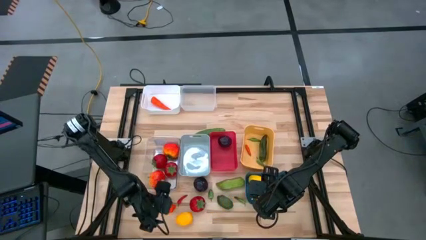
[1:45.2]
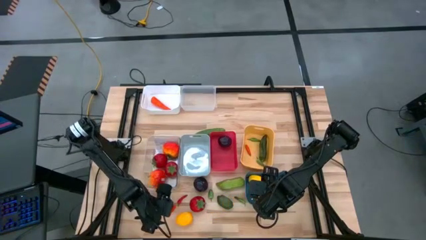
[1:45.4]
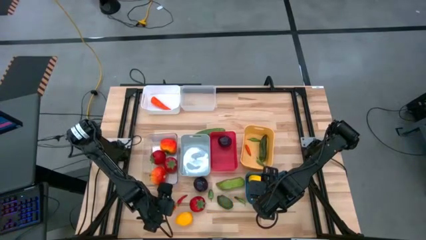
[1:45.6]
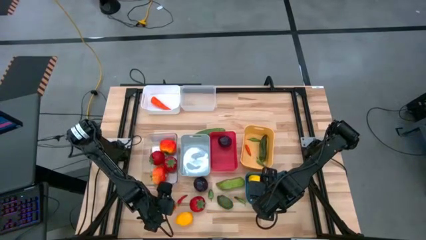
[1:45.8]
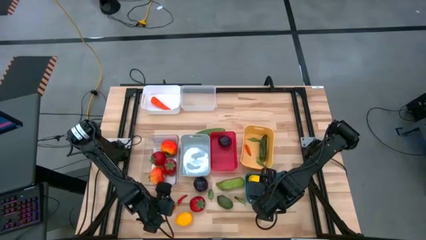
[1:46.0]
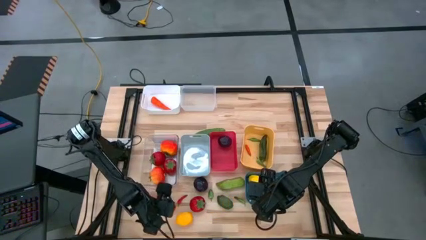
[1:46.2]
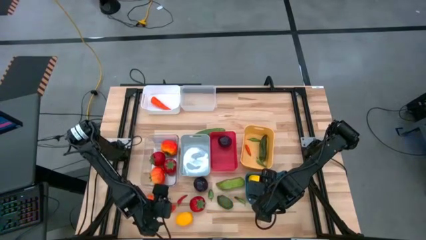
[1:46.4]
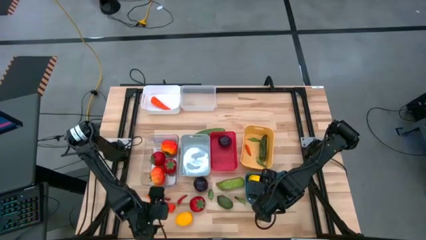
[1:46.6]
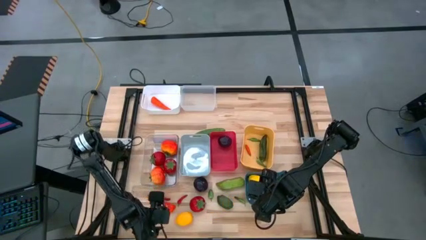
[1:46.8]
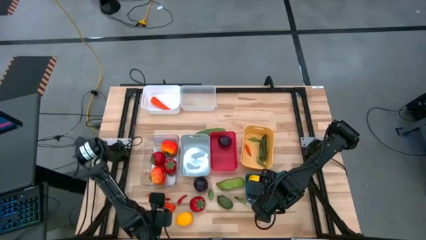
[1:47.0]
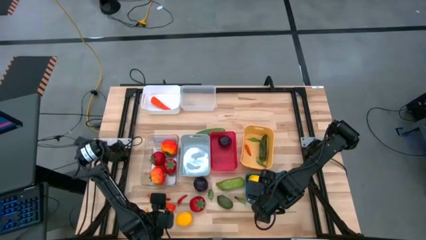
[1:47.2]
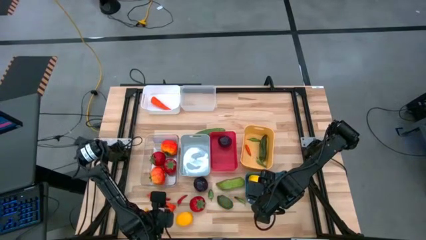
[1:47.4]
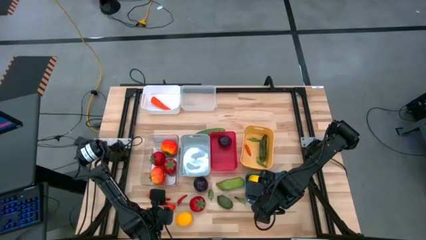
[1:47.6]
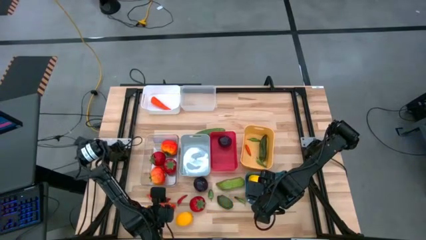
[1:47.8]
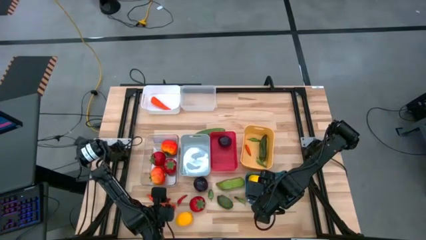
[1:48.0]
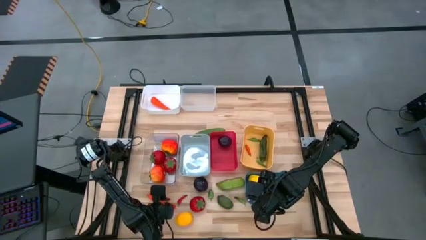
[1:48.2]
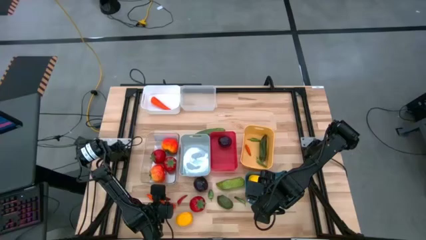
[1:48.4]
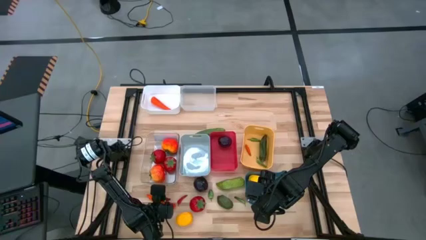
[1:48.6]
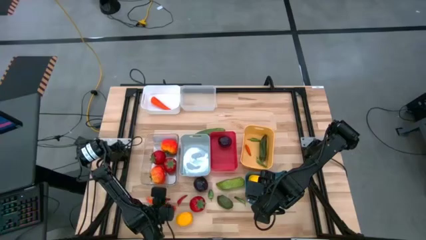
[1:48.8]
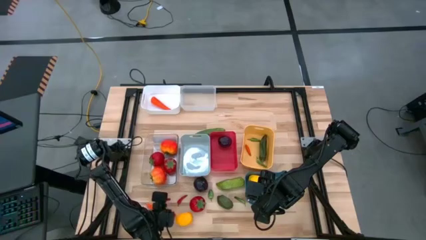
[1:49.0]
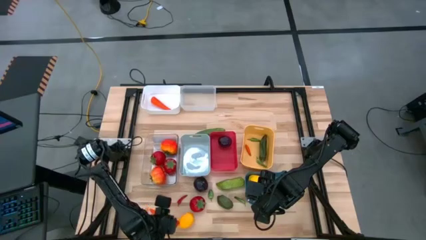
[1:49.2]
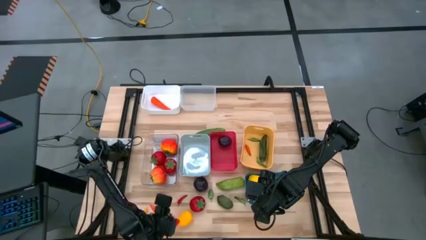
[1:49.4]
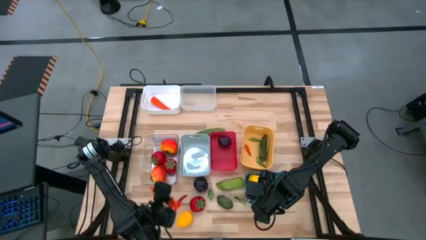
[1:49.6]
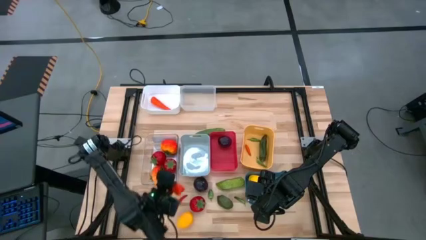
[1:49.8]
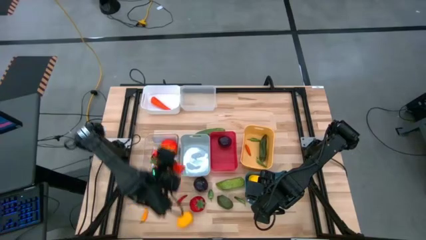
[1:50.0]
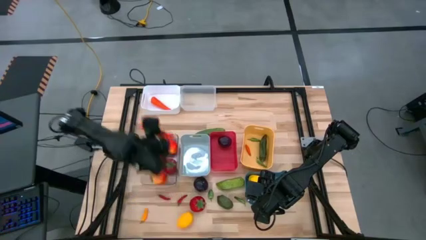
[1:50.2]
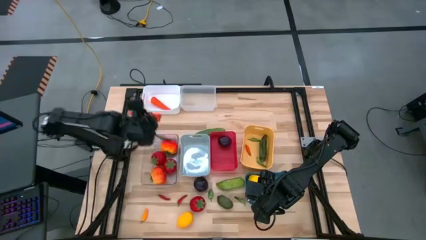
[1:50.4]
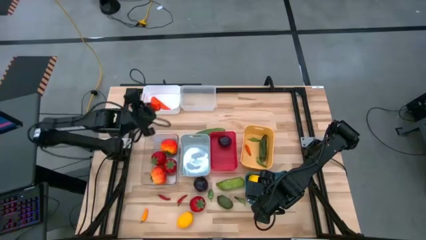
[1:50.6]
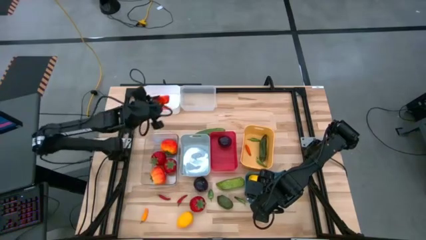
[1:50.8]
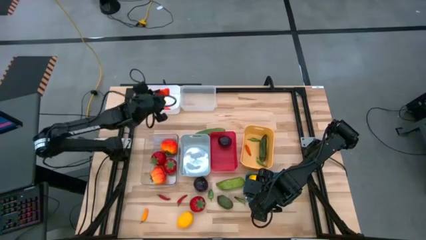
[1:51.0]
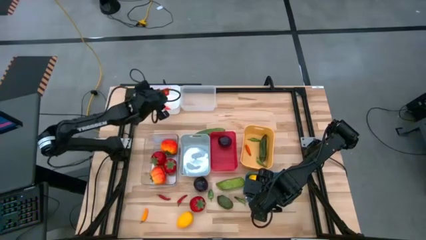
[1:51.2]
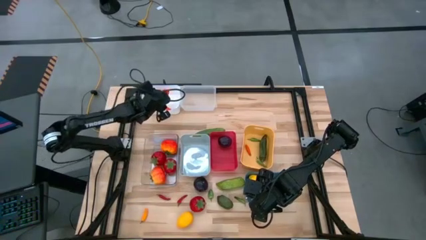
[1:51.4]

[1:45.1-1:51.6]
Task: Sort produce into baskets
Put the carrot into the white bin

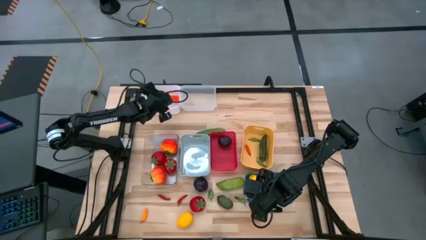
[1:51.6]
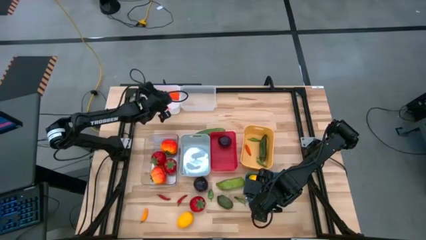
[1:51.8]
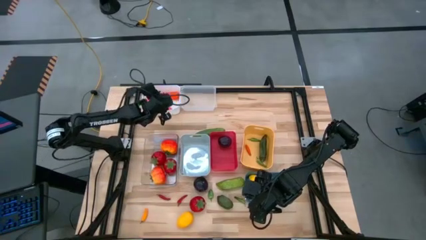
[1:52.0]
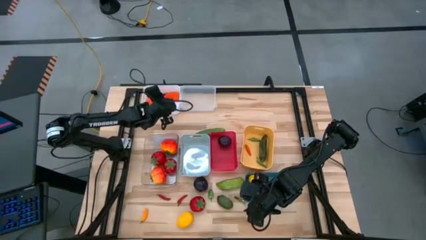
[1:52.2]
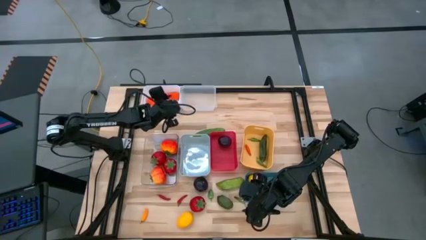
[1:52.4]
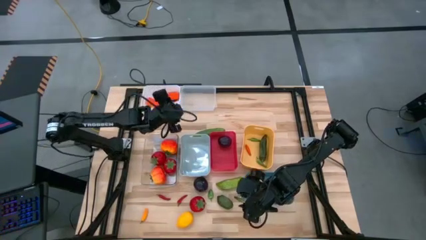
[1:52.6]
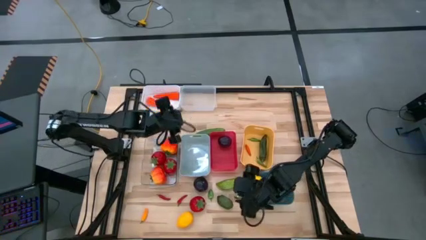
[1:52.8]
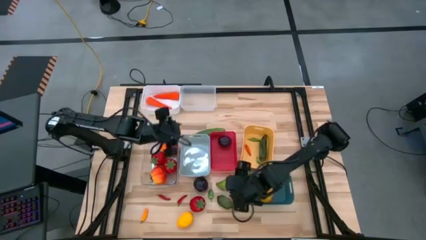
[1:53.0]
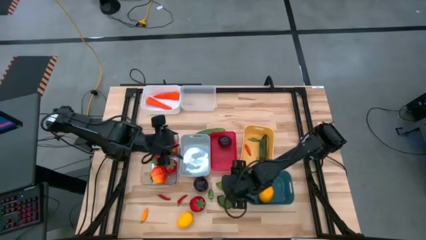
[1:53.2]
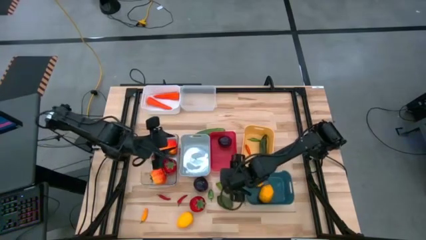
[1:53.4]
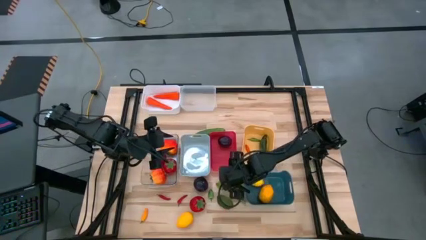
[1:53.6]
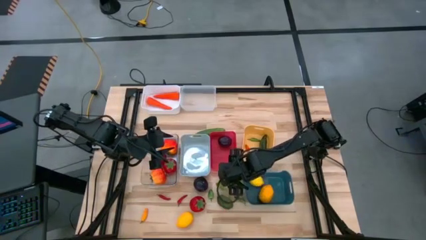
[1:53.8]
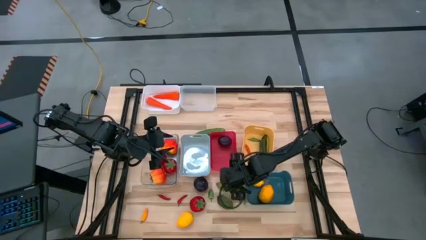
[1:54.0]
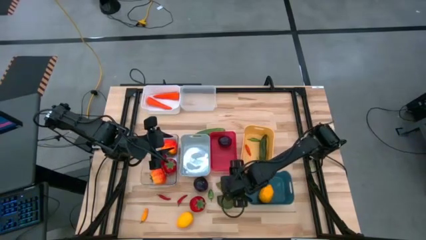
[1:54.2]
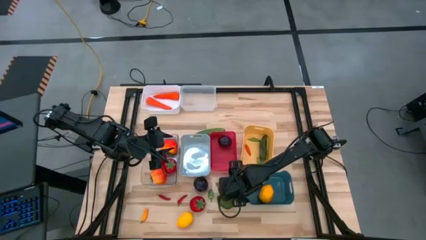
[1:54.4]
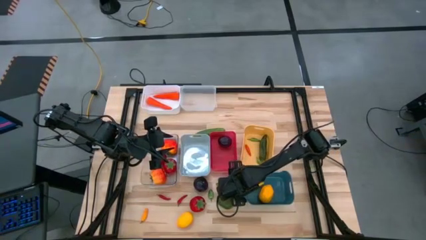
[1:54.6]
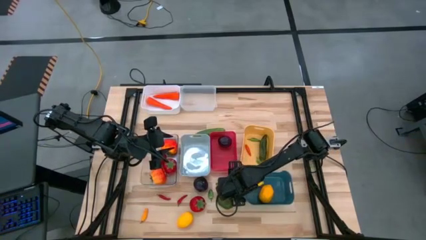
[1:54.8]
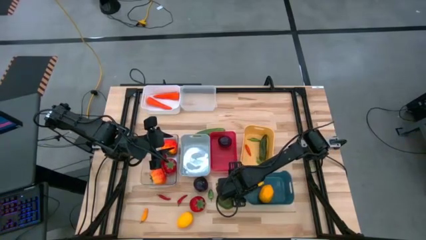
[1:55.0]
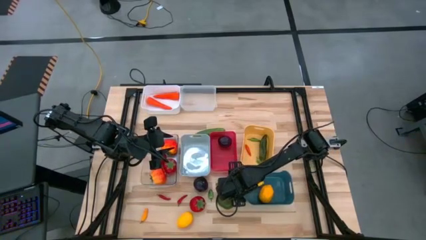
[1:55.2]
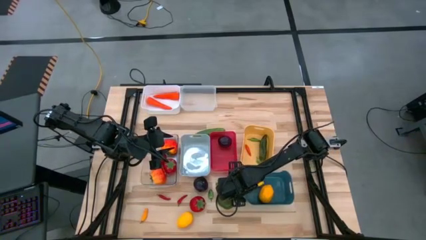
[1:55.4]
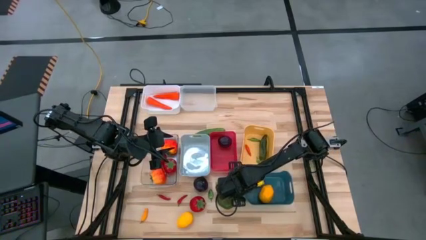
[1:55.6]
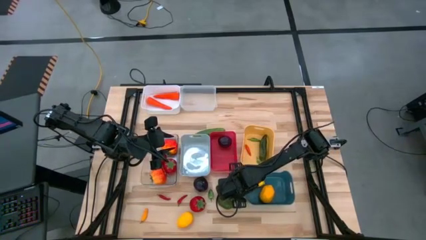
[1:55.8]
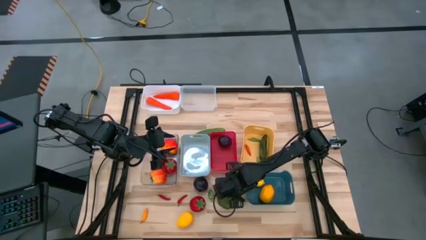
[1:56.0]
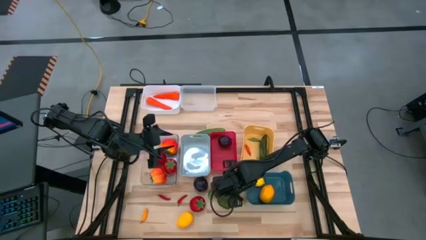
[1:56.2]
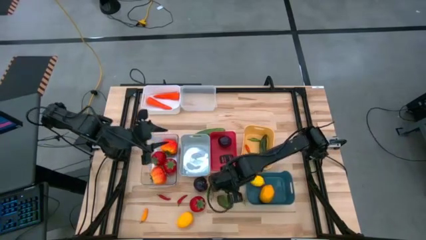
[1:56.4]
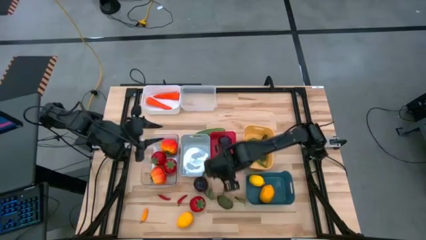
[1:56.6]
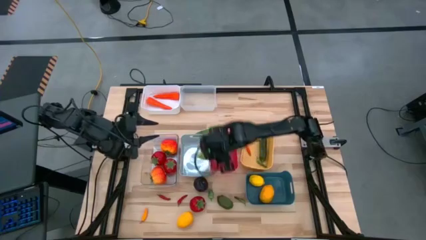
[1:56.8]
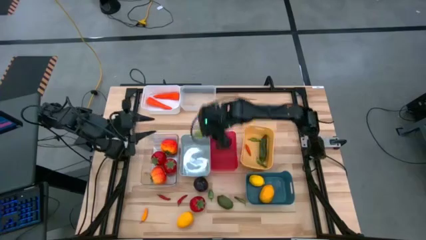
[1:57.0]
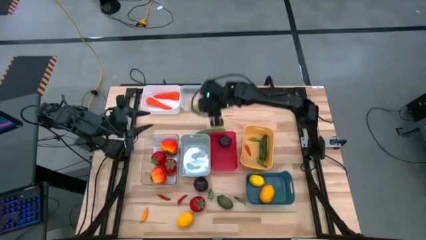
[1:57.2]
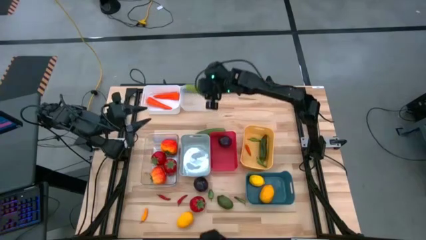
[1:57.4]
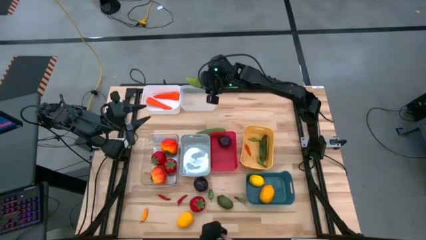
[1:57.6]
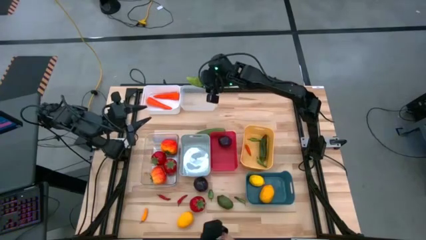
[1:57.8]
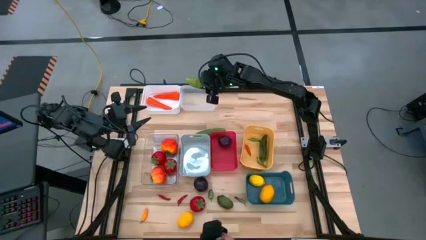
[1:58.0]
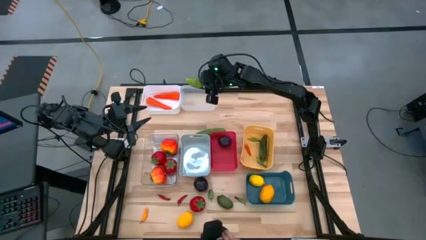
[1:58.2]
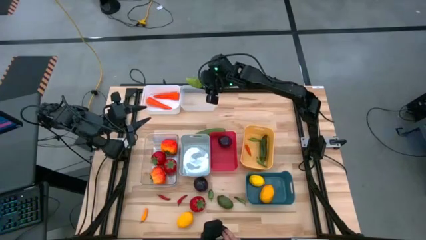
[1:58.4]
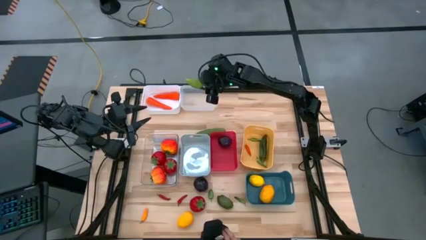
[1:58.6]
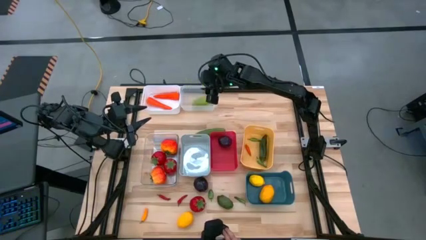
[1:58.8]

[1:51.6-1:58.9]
Put the cucumber into the top transparent bin

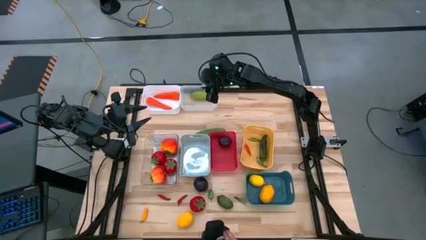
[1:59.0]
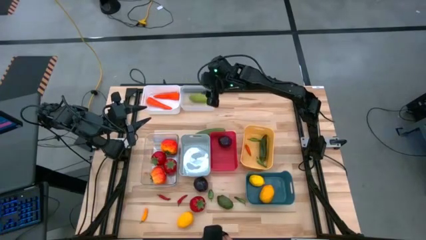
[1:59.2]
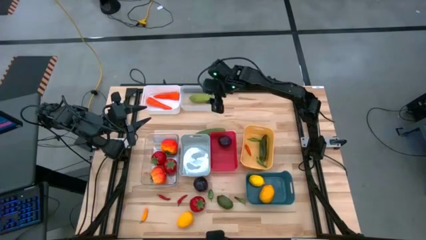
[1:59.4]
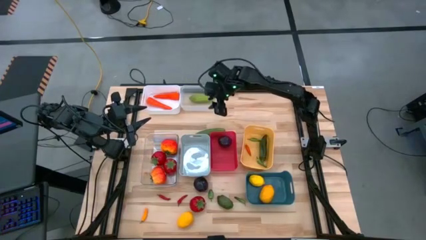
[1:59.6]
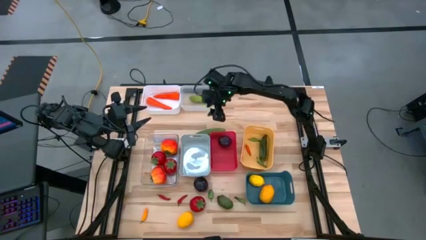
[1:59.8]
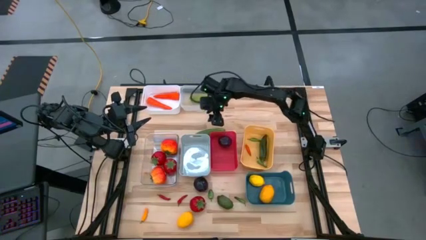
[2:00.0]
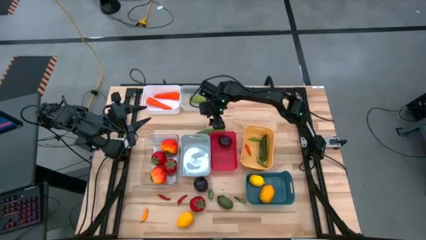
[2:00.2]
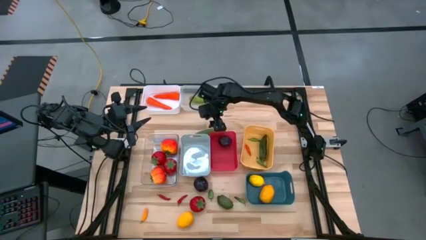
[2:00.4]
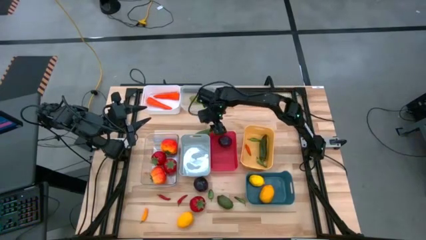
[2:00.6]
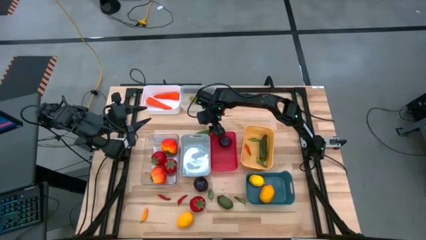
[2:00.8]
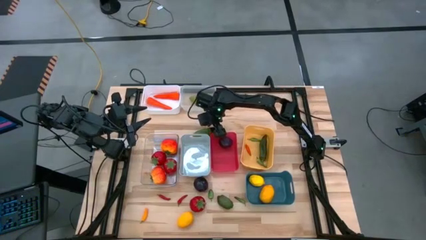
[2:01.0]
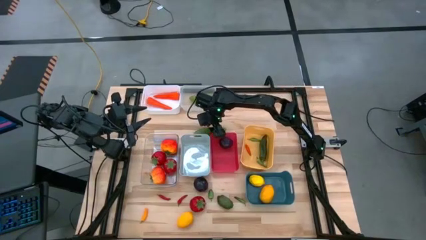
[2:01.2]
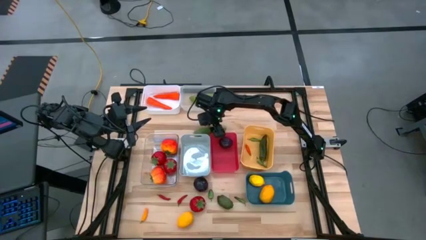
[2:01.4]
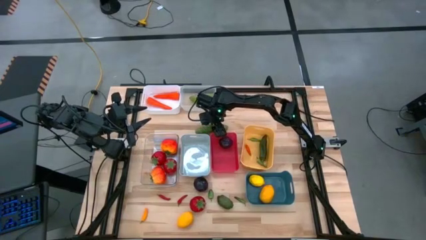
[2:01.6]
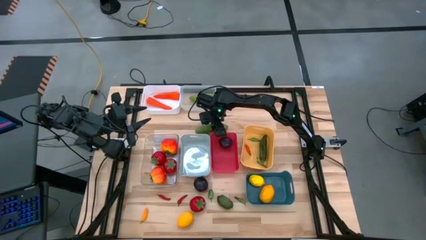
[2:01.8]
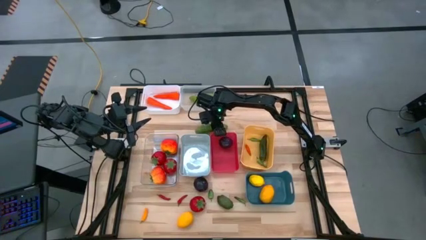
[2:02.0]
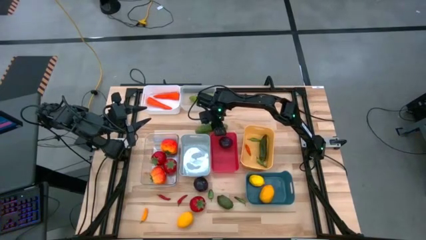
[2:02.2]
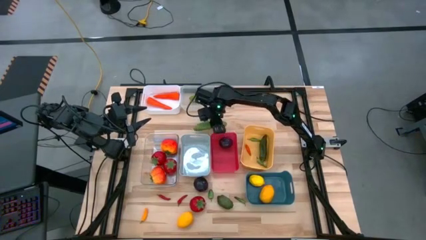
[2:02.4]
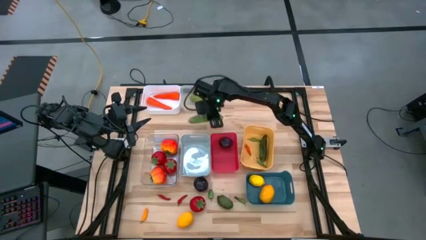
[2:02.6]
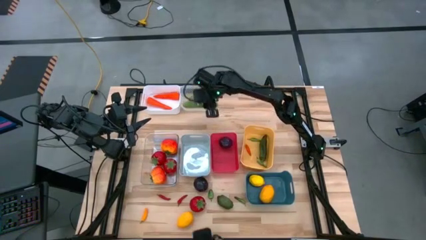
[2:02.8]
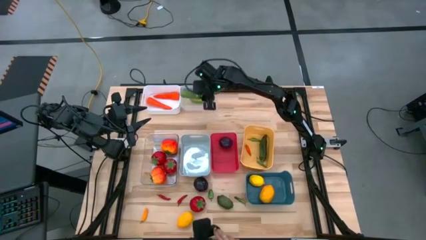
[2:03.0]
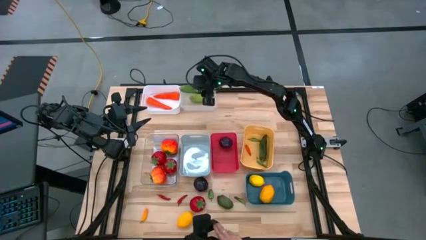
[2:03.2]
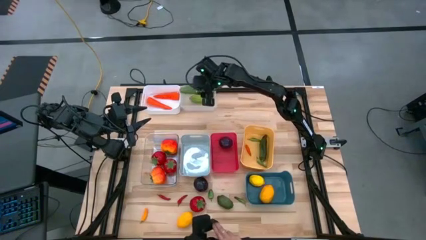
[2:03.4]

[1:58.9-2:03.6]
Put the cucumber into the top transparent bin
